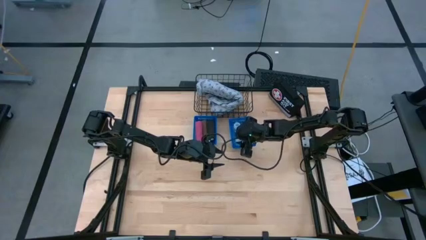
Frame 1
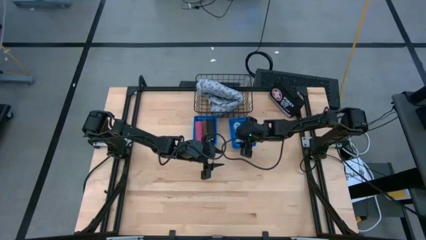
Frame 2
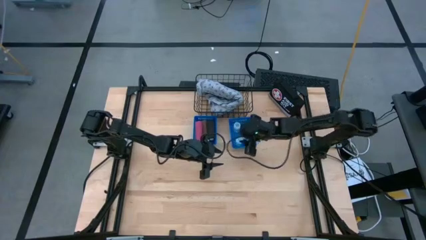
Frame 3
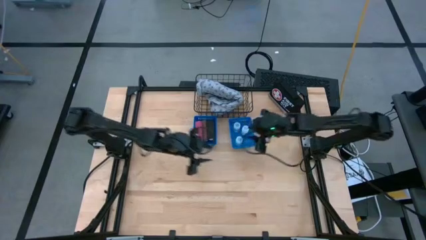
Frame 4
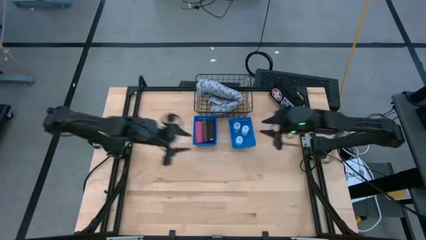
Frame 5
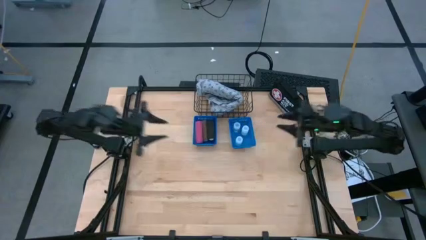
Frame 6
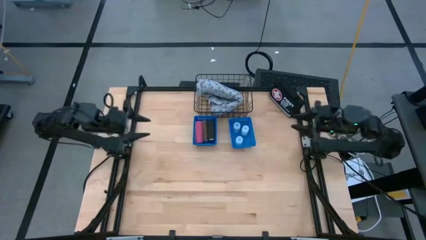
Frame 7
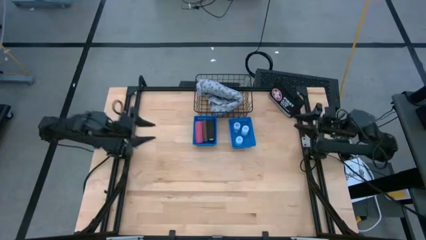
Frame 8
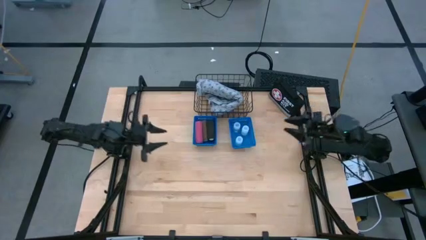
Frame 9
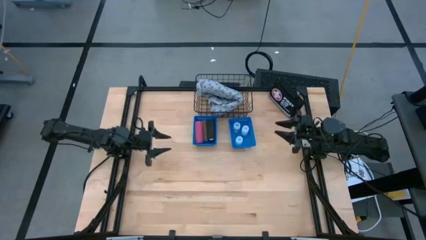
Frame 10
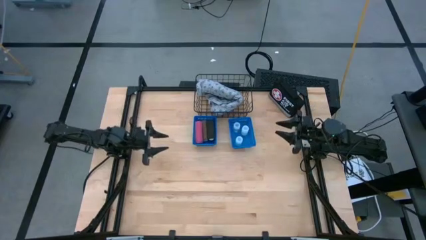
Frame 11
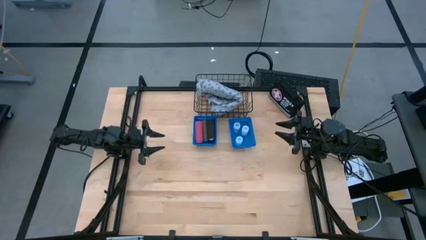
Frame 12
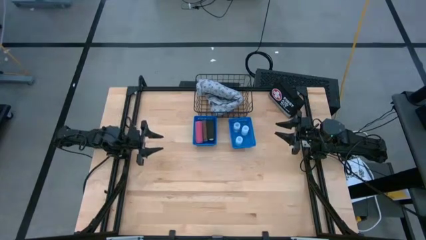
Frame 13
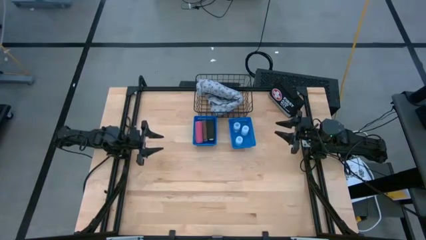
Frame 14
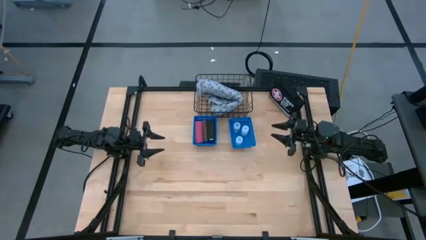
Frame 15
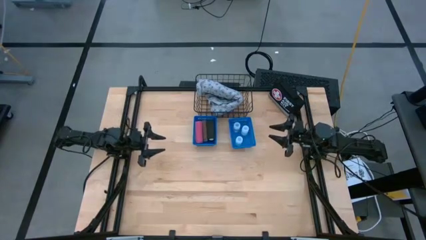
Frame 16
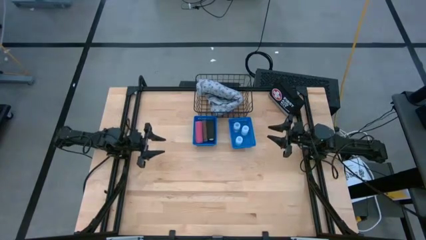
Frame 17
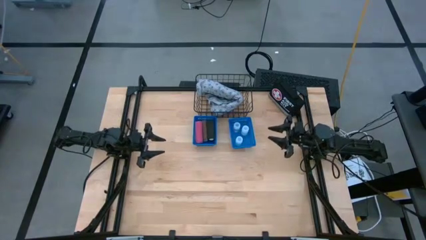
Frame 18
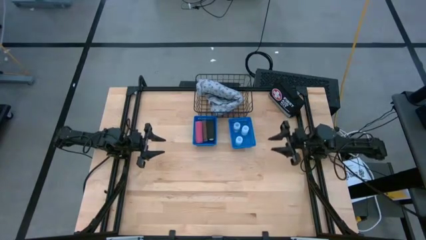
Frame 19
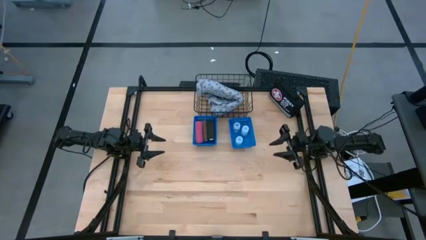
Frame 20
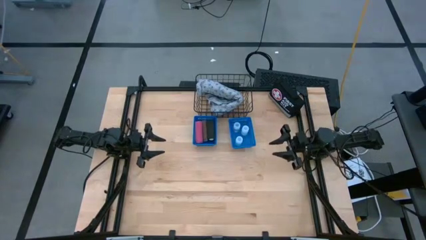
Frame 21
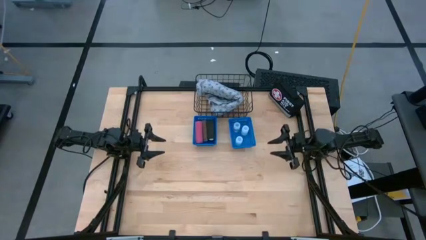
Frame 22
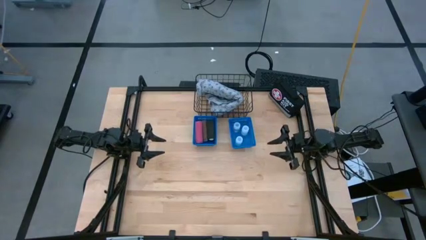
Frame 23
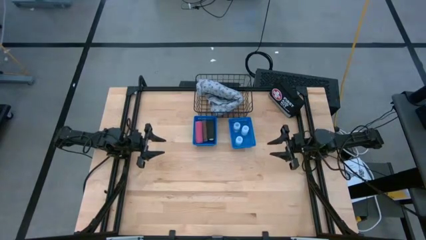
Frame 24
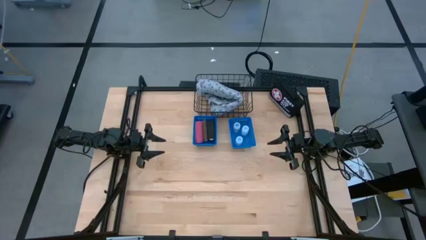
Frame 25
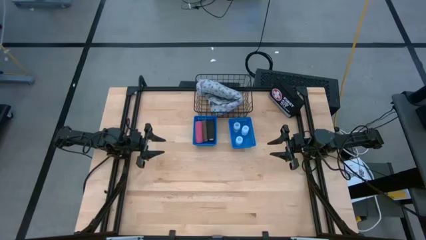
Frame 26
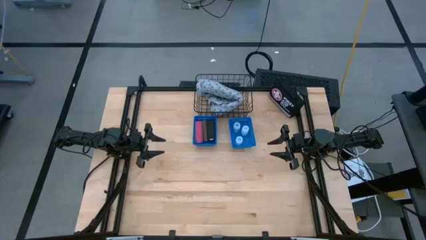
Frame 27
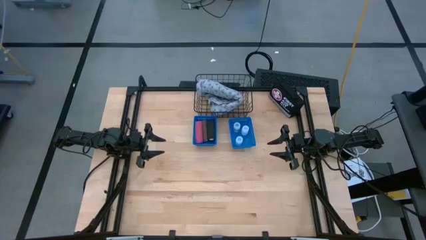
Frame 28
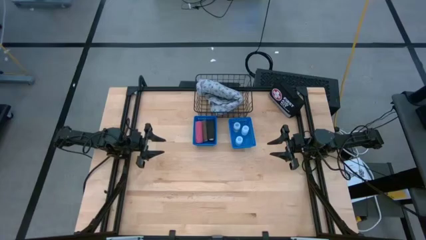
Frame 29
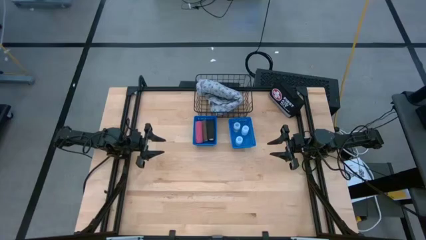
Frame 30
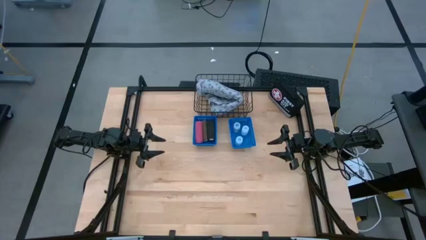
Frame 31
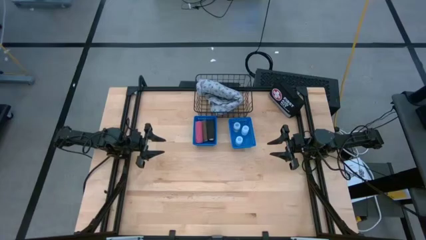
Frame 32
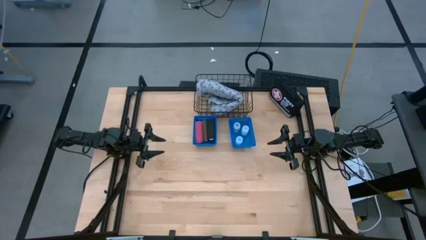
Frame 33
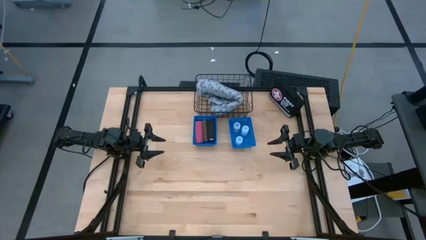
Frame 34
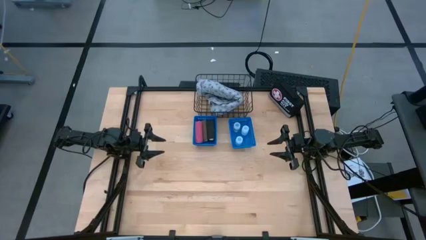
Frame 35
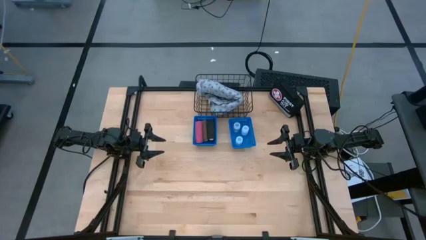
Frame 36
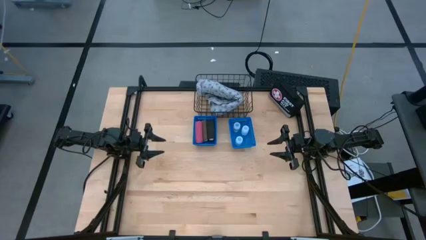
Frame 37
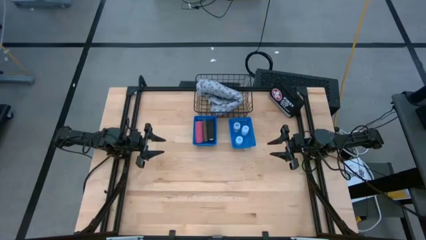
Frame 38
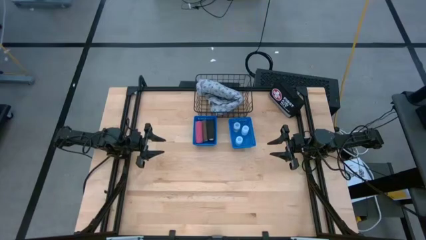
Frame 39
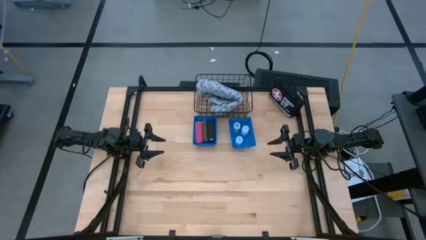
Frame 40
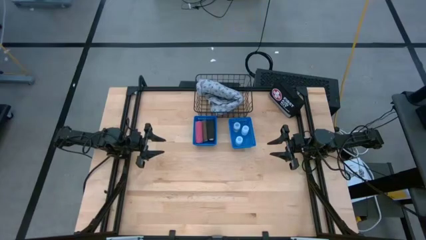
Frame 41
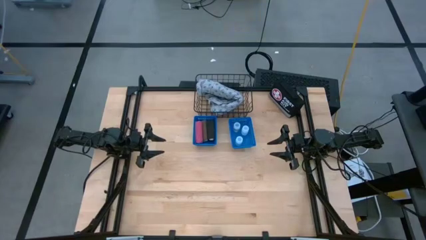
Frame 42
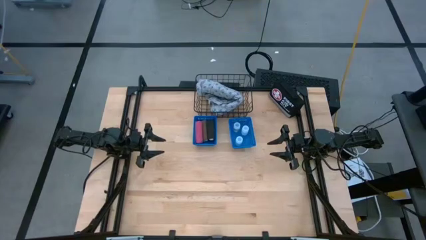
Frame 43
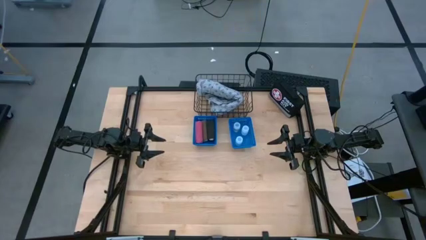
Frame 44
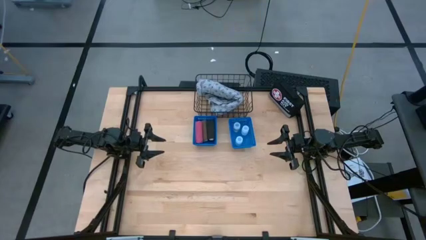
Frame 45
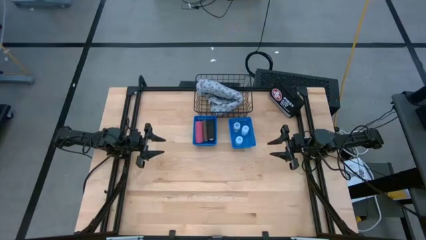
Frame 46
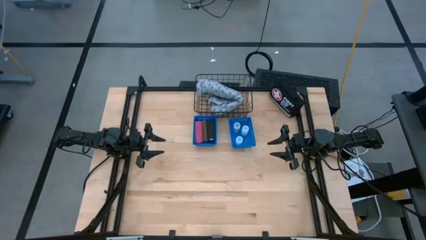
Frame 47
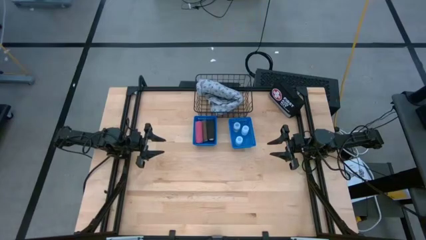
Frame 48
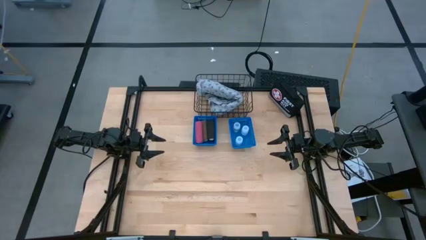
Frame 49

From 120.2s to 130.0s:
Task: Pick & Place Medicine items
Return to Home Position

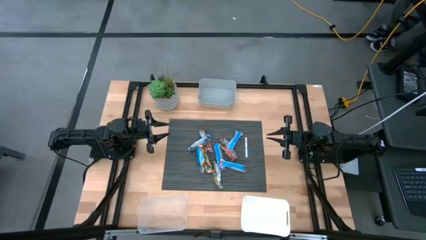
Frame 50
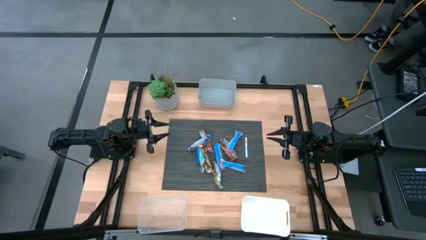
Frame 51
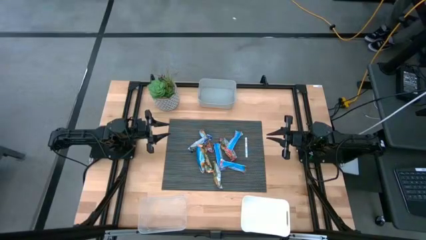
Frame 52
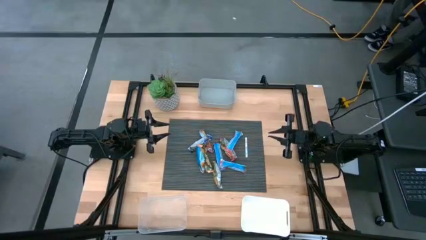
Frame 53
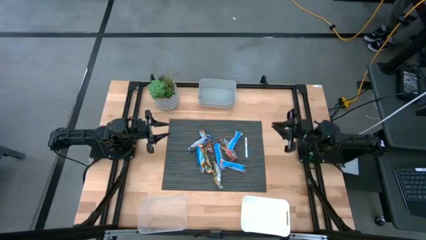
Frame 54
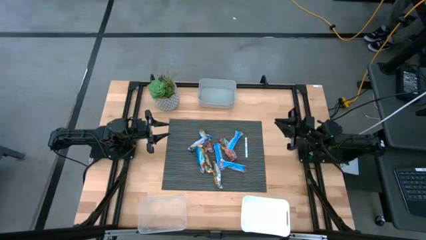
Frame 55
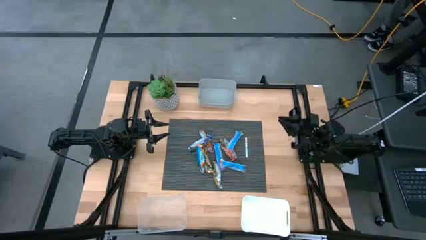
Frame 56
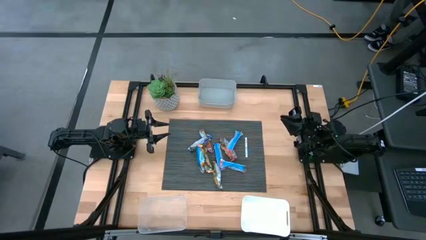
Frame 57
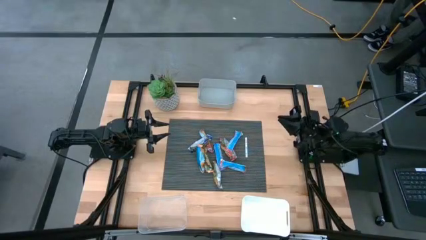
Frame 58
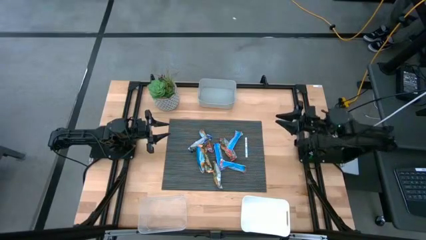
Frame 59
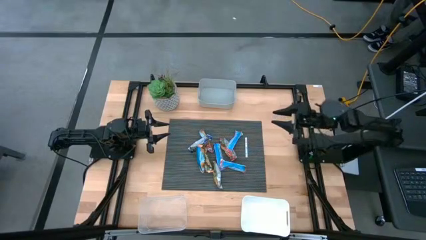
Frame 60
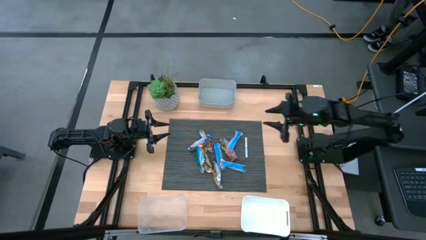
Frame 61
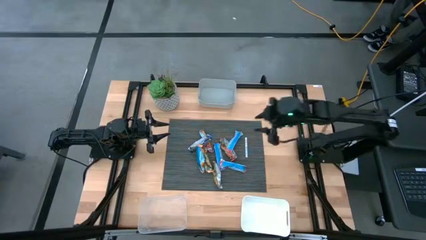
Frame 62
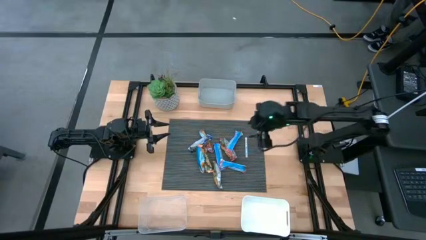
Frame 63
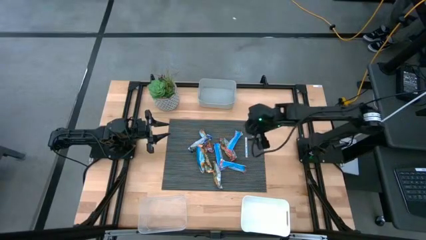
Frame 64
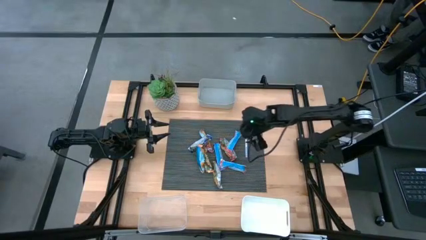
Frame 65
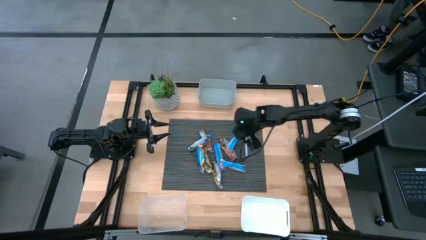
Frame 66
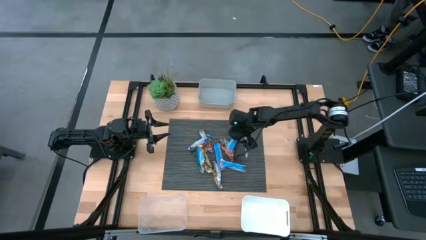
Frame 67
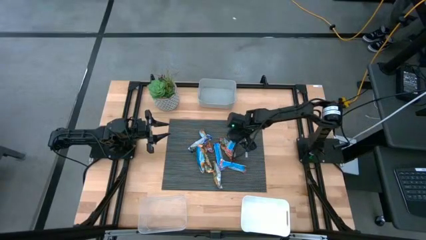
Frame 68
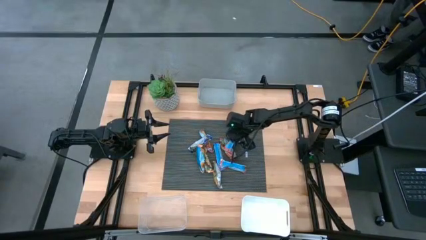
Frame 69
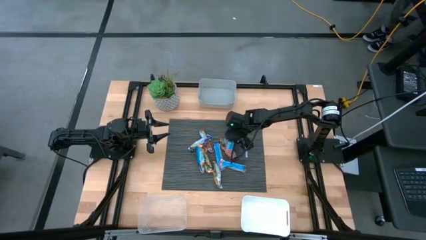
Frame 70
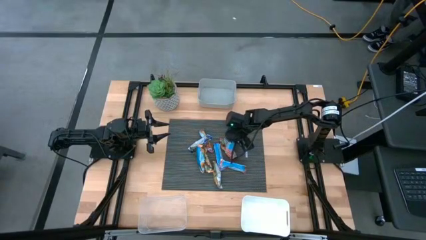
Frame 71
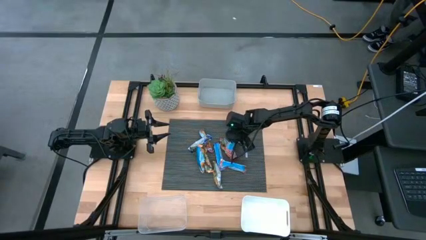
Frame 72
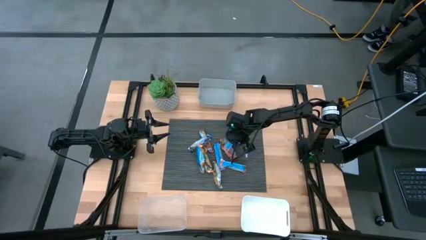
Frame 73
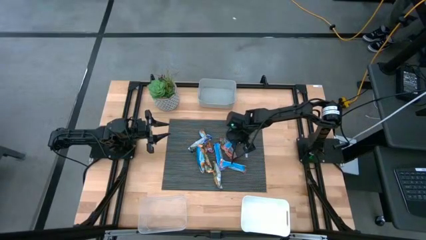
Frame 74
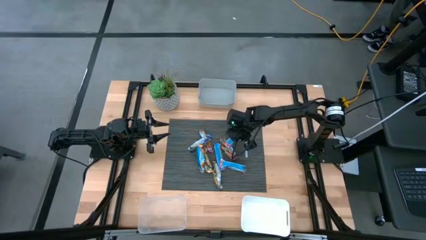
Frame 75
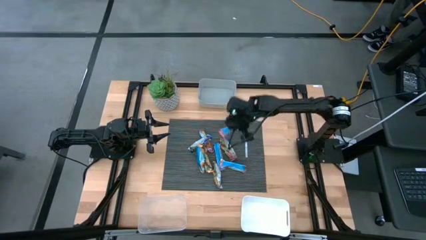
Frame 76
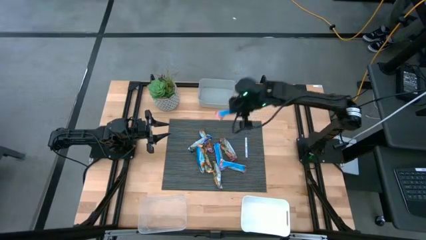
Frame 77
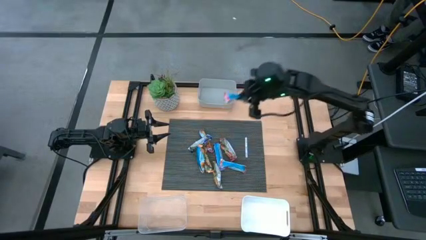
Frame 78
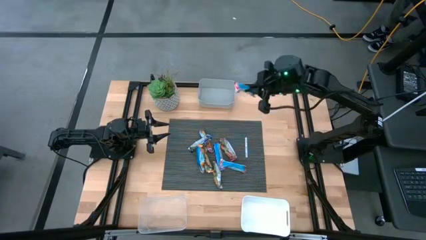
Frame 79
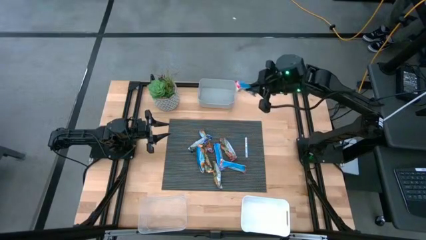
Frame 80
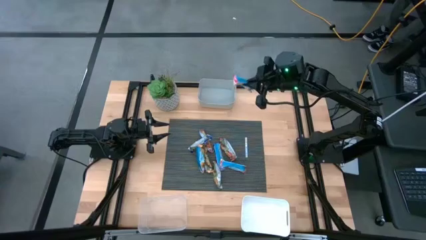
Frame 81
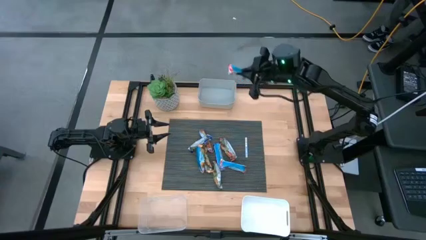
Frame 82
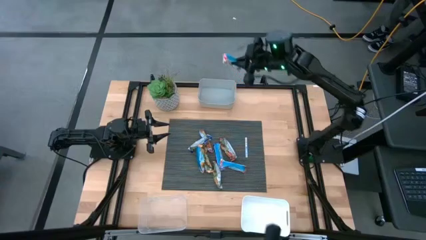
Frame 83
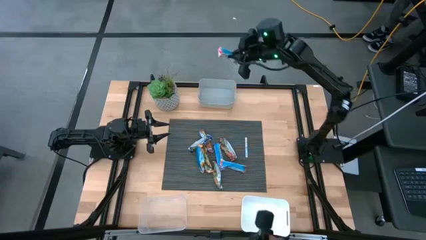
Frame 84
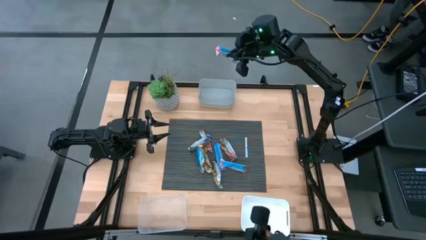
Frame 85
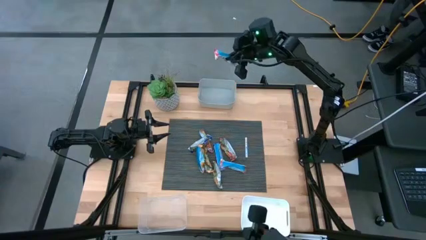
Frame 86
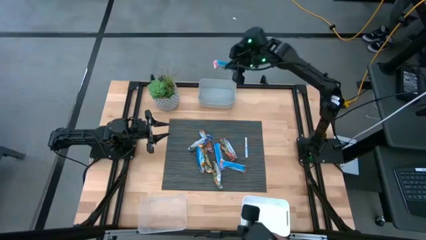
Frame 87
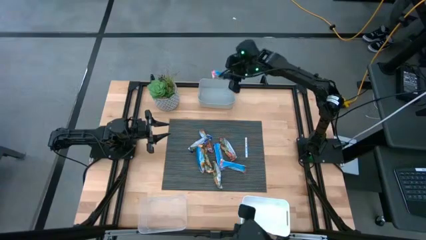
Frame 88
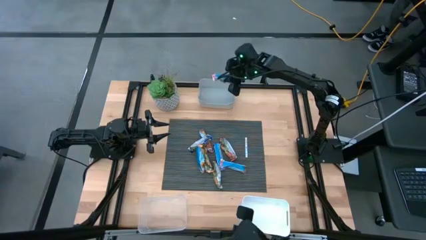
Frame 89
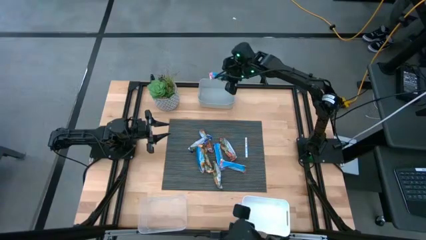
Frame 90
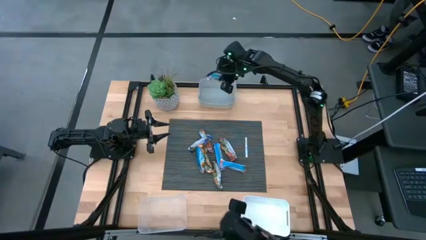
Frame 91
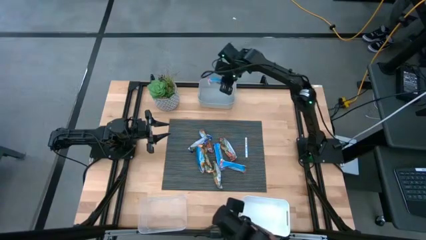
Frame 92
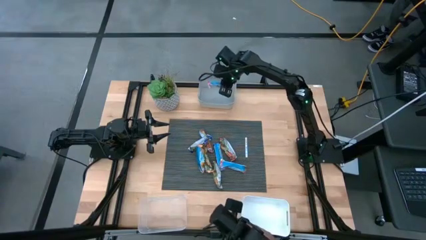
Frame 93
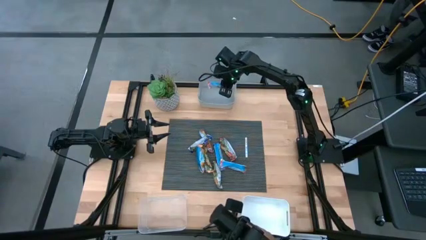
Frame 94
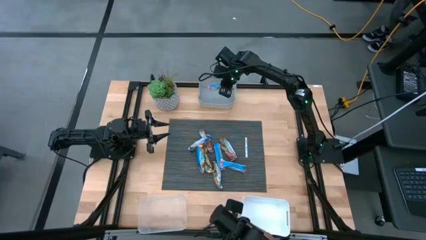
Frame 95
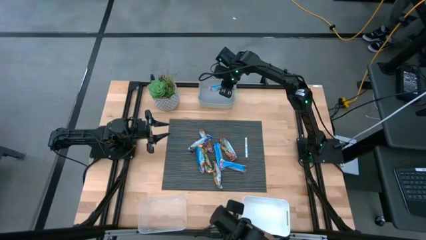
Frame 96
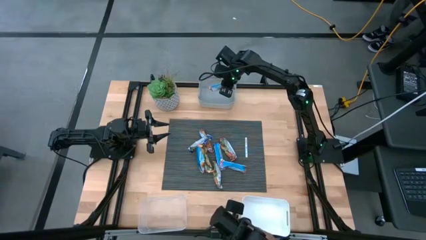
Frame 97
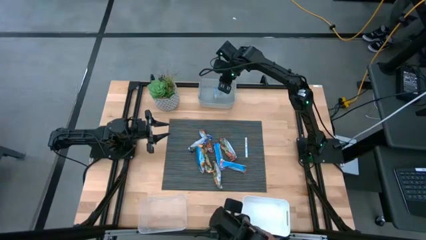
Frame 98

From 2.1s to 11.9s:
Task: Pick and place Granola Bars by type
Put the red granola bar into the gray bin
